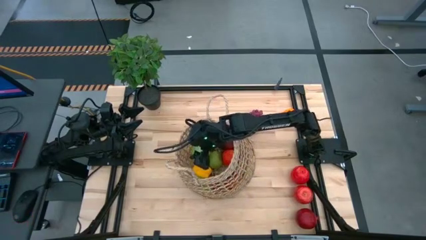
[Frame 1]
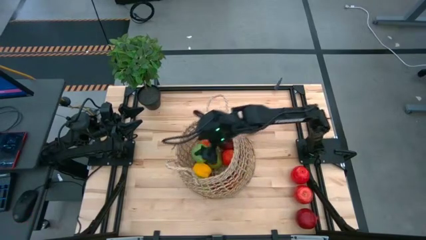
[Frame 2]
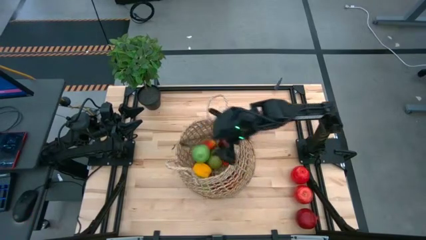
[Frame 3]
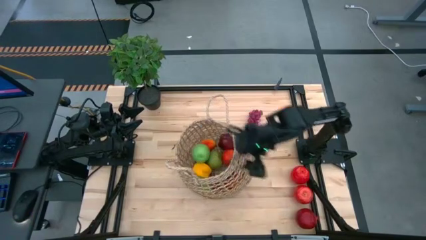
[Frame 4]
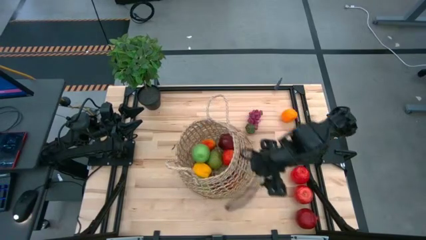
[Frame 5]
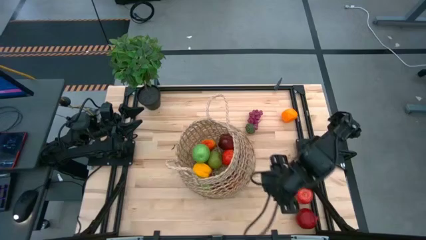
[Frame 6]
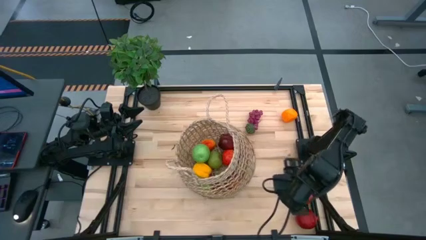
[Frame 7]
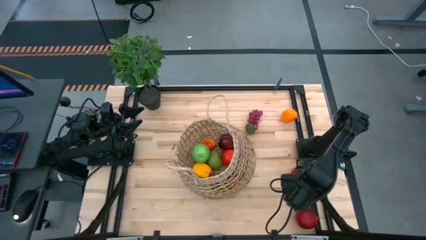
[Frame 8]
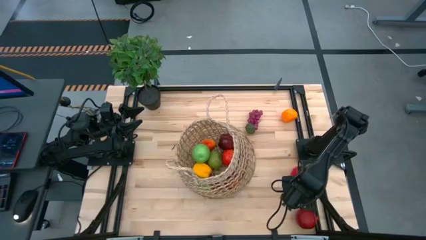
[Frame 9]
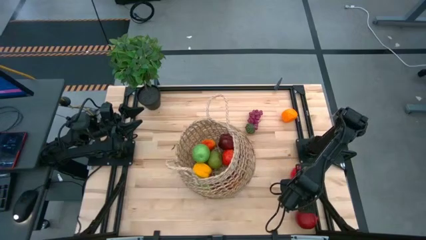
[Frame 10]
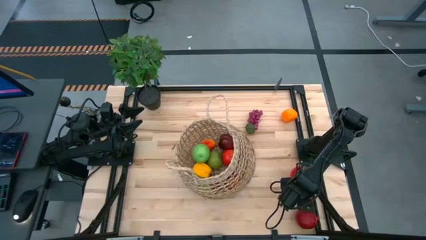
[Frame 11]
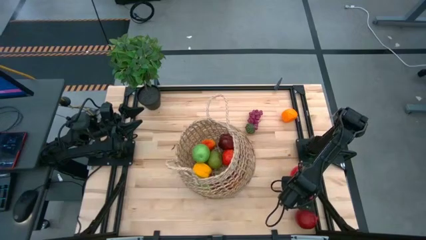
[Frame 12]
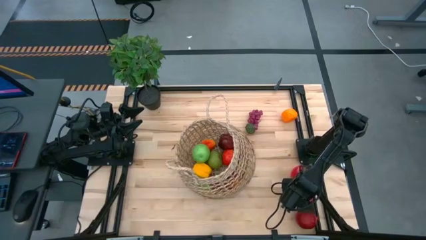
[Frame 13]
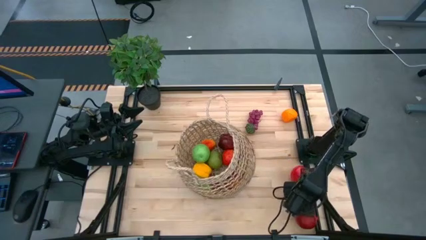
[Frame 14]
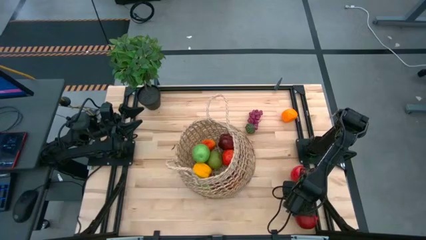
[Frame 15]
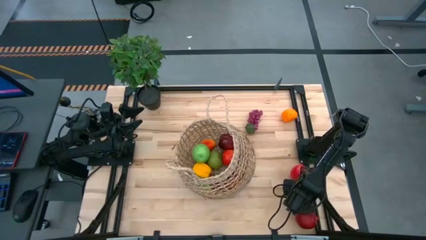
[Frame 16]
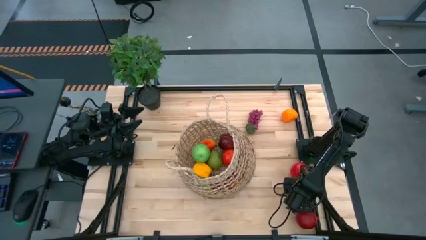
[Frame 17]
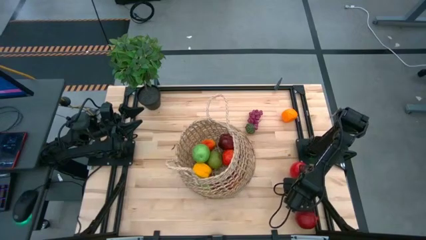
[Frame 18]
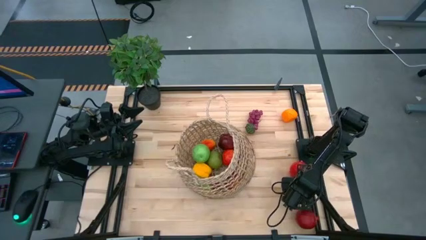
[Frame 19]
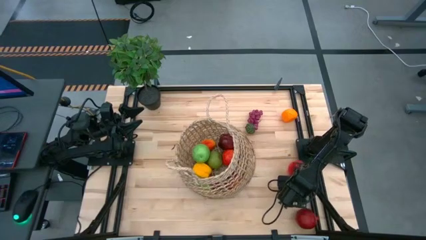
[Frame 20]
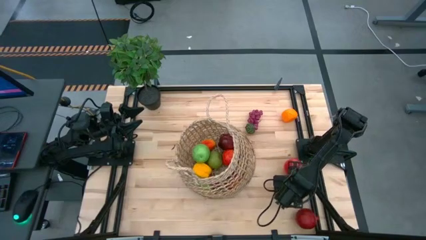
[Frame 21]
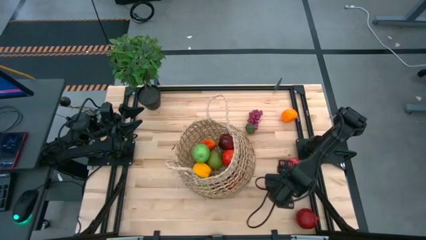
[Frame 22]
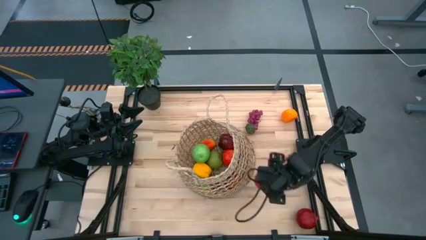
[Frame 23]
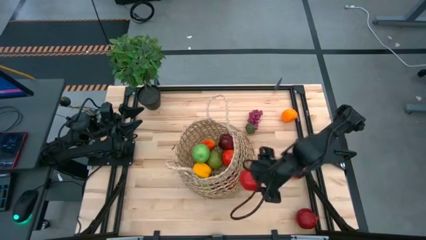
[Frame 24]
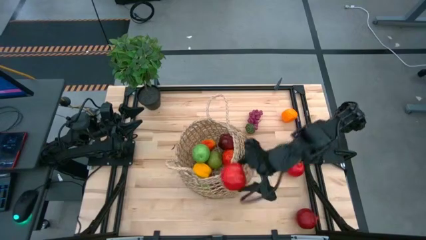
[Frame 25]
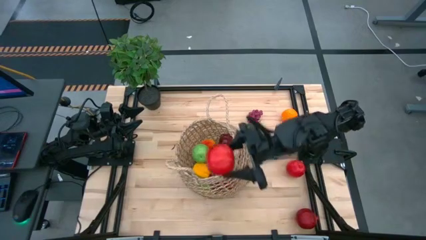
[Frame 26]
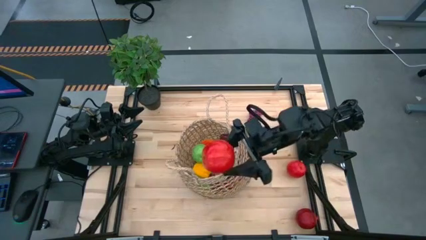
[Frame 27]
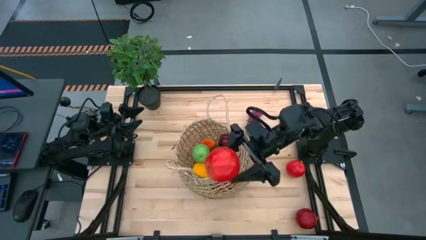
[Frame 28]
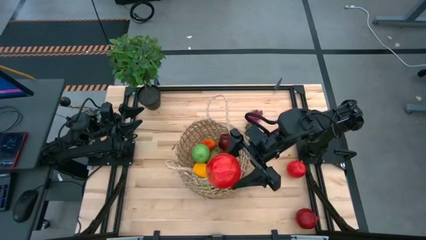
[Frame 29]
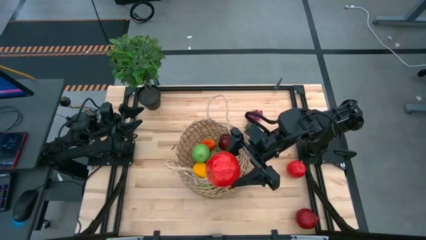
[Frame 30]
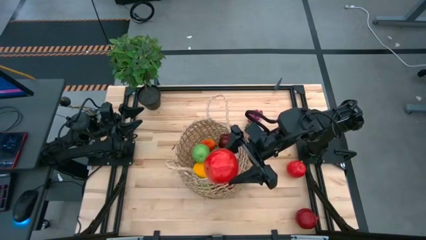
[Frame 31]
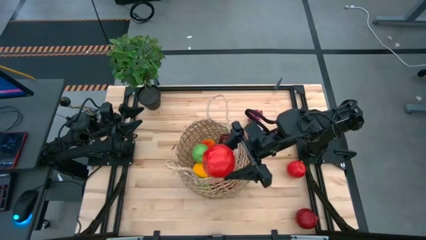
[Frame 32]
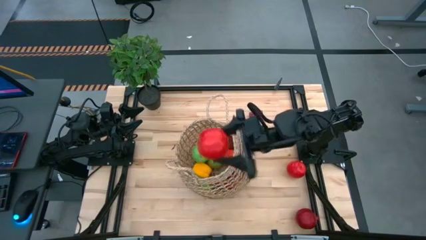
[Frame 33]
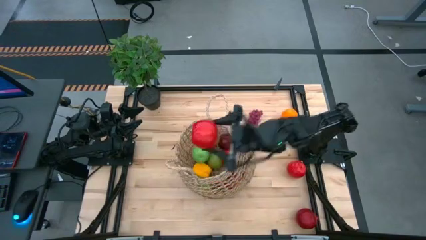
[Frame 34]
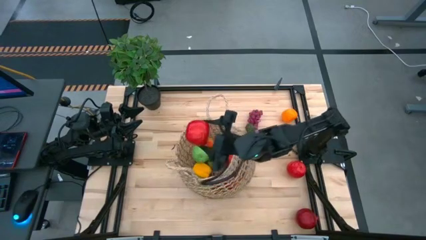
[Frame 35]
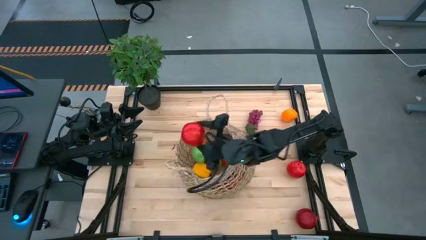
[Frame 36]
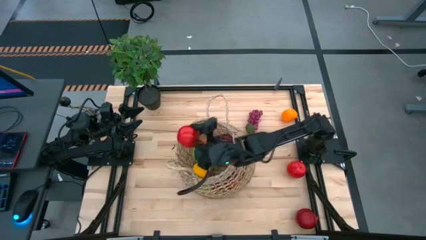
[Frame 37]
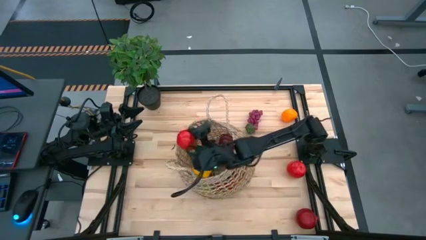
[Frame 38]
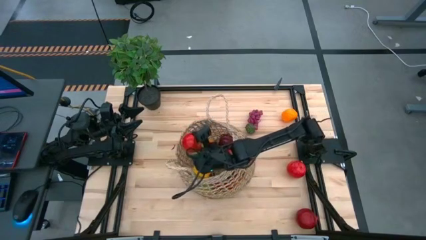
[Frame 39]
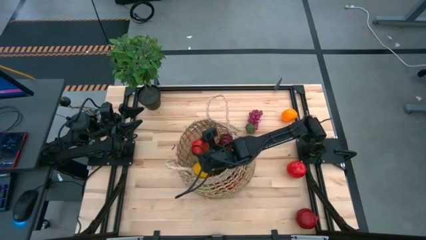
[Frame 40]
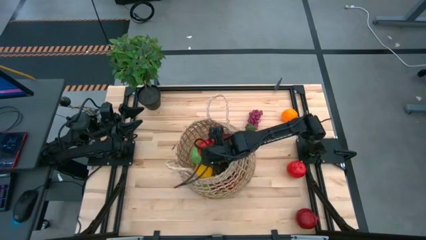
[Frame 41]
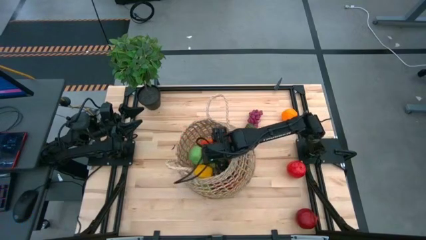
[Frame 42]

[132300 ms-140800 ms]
Task: Build produce basket
Put the bottom red apple into the brown basket

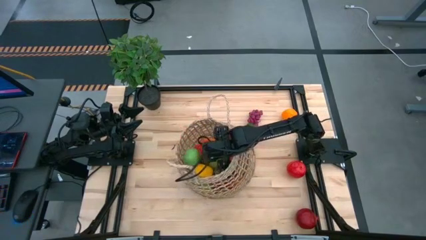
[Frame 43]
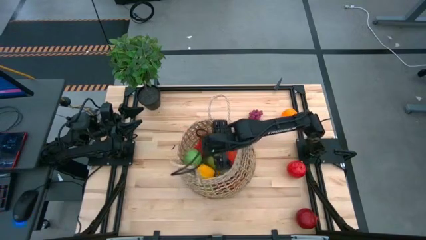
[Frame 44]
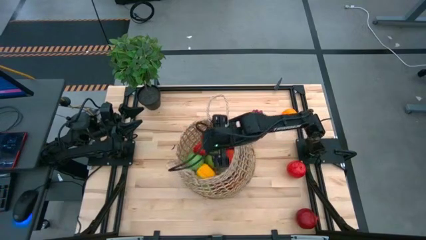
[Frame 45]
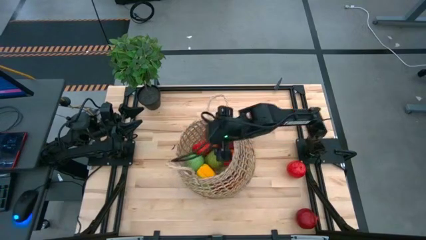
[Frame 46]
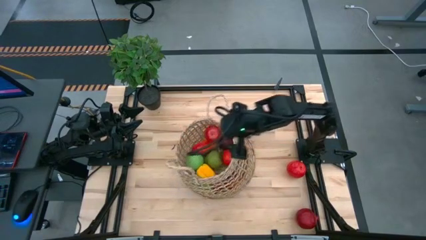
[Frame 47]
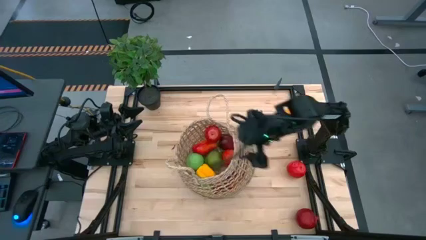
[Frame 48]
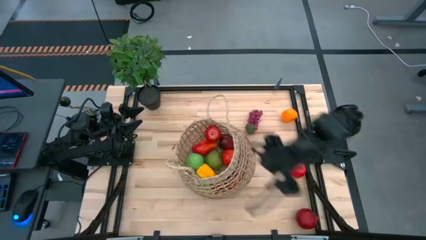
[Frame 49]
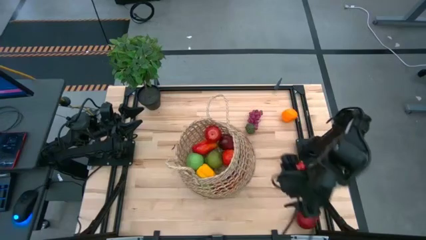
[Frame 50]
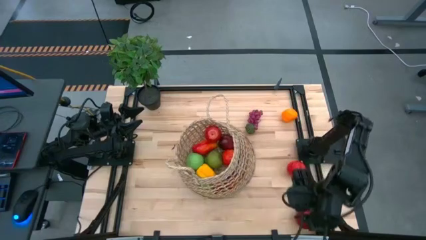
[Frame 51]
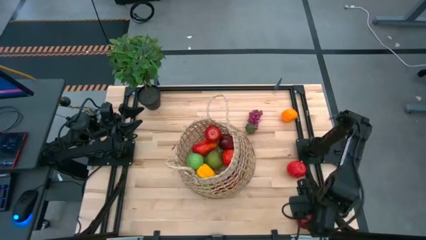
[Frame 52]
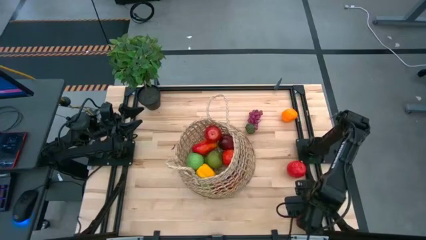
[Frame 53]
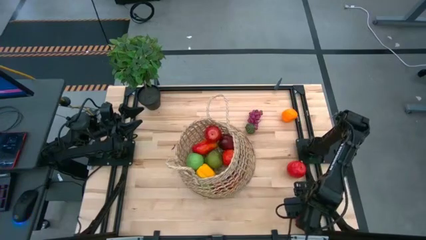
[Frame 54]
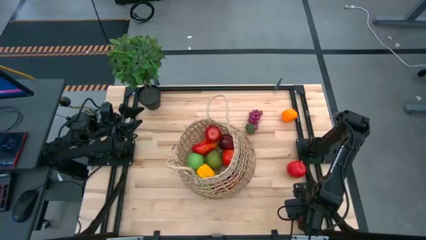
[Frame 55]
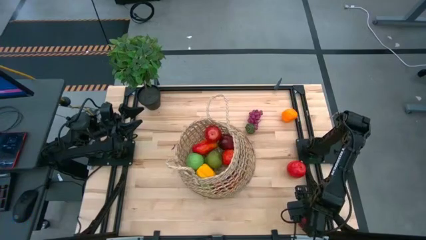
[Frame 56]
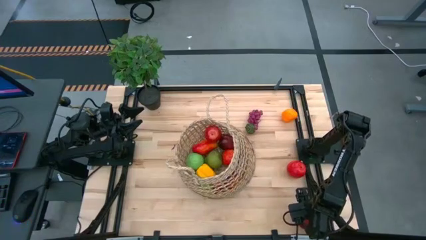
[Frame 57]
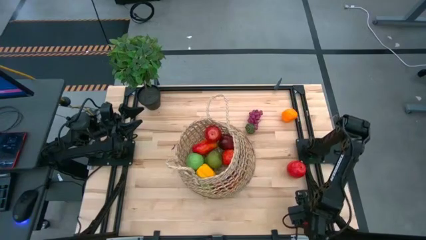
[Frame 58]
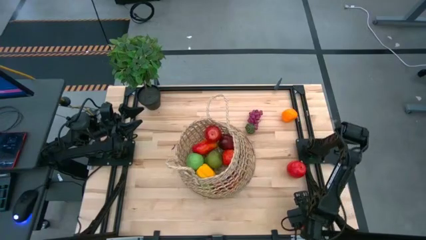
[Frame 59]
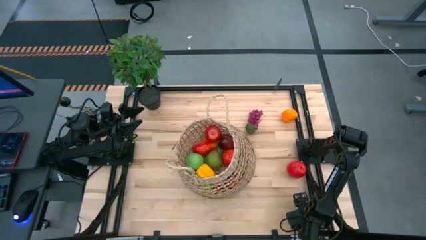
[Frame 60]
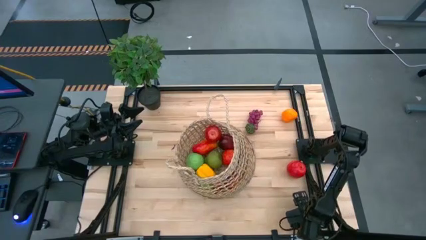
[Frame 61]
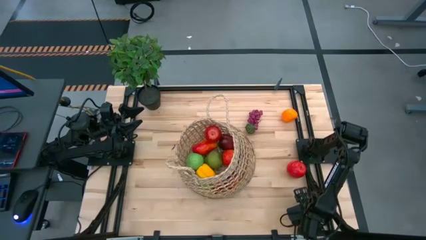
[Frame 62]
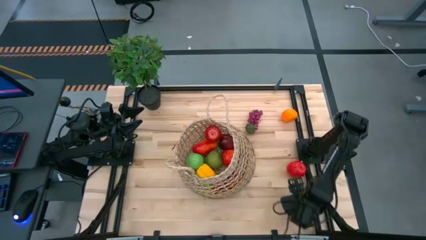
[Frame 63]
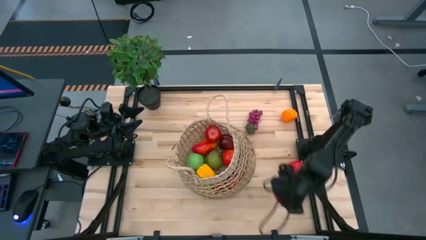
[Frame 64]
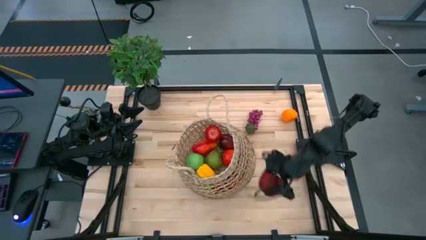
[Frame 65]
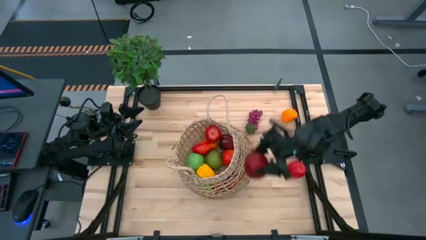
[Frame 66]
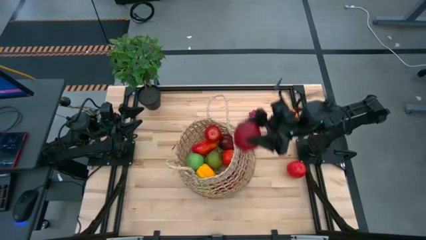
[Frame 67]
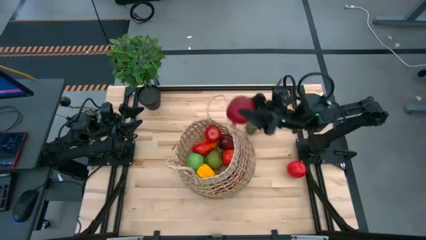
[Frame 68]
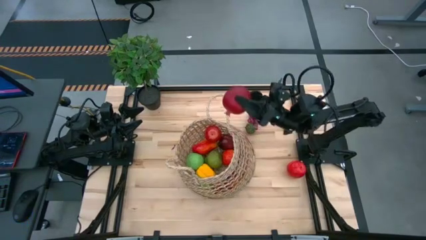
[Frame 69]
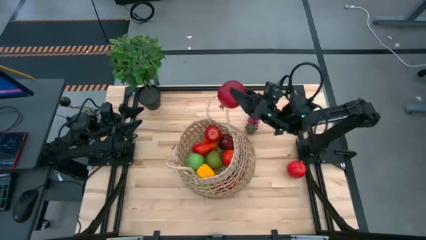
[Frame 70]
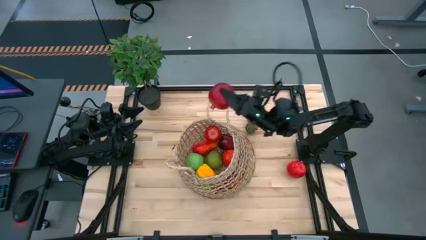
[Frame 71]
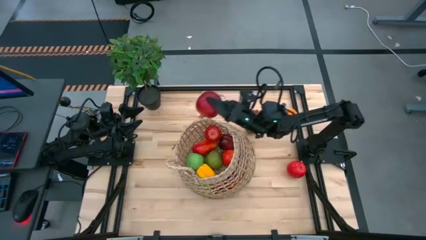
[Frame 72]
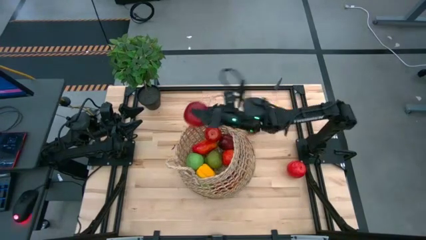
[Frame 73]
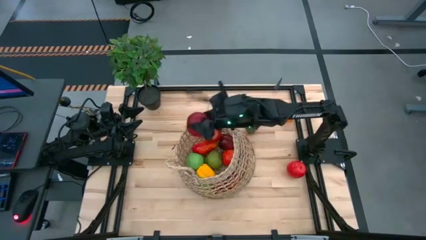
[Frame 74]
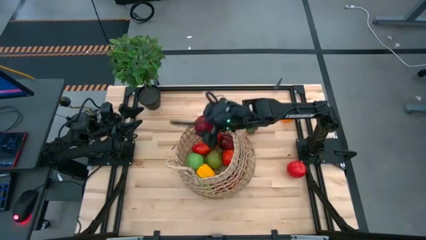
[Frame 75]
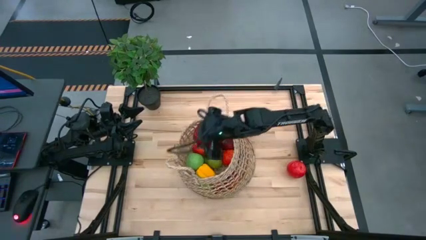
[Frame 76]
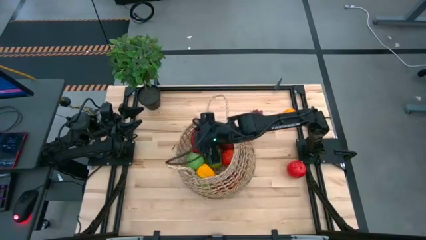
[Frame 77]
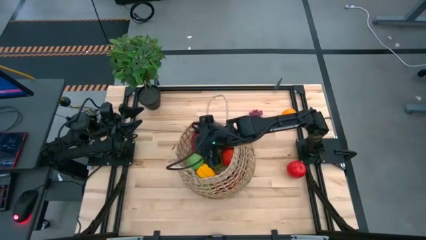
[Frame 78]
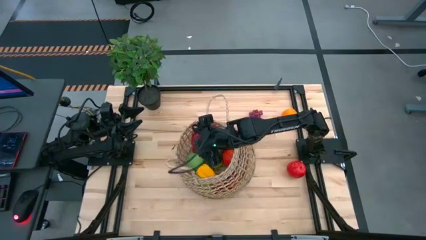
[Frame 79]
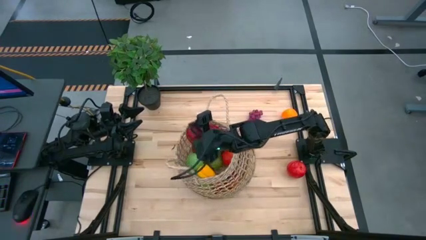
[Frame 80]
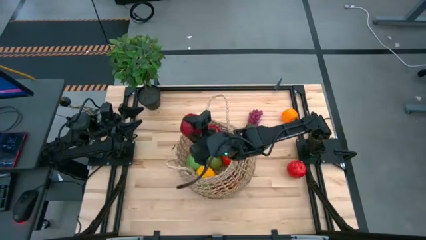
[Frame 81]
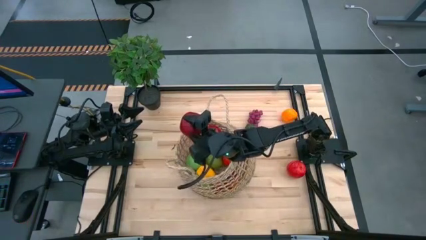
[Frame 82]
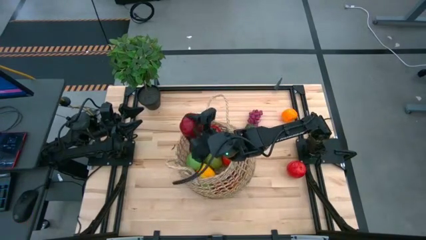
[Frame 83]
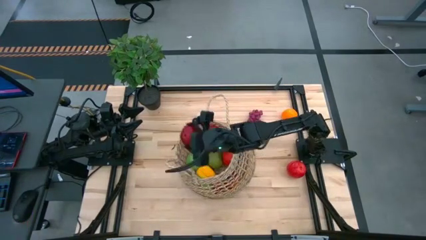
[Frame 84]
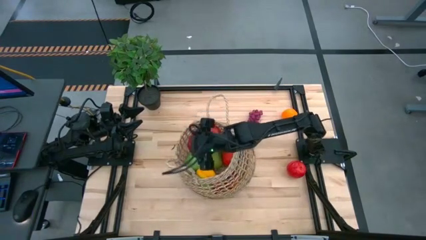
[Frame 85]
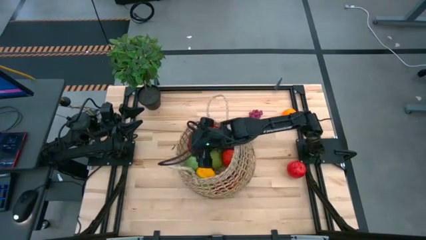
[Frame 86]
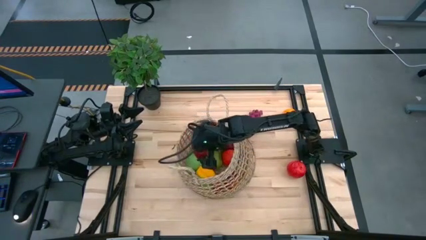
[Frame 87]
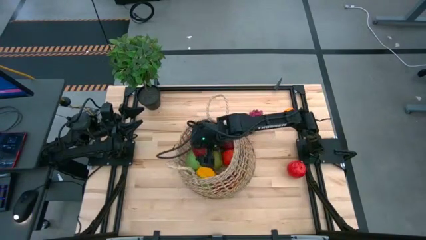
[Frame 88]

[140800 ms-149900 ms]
Put the red pomegranate into the brown basket
